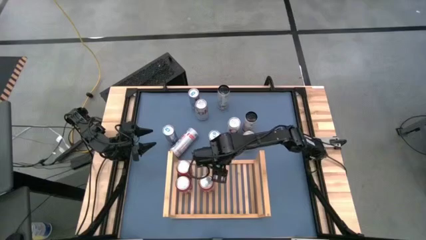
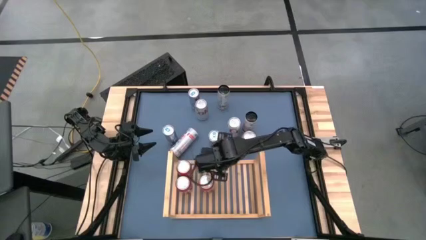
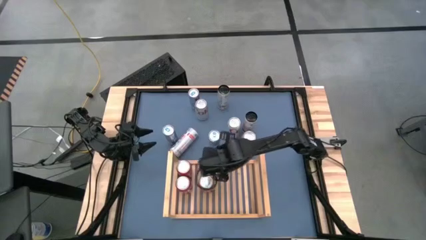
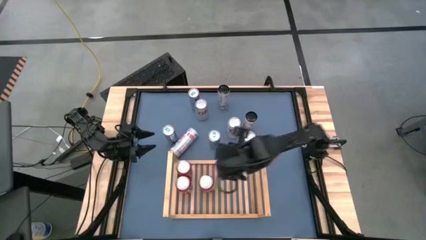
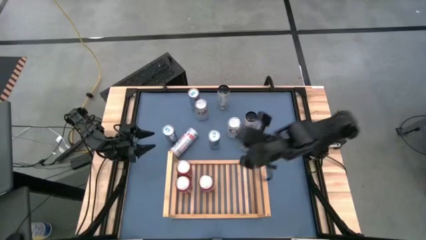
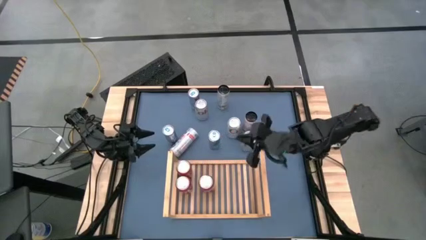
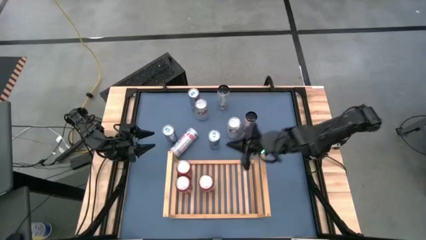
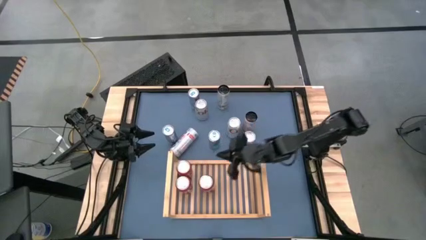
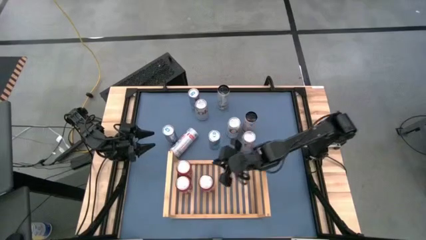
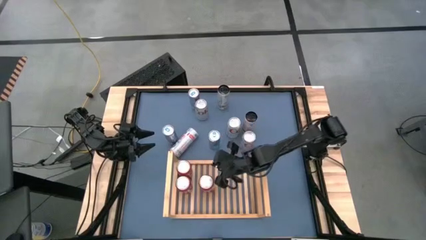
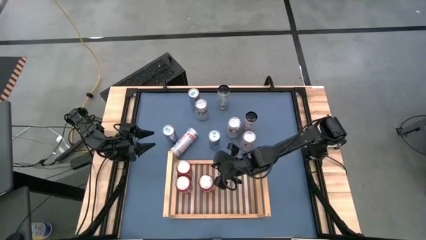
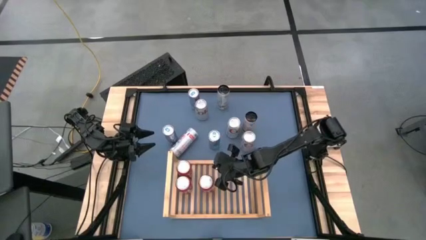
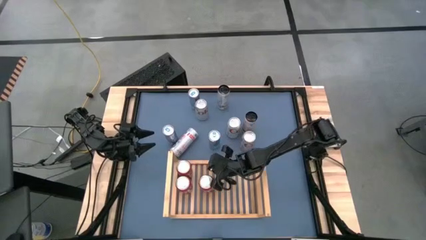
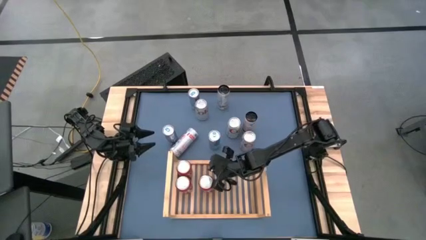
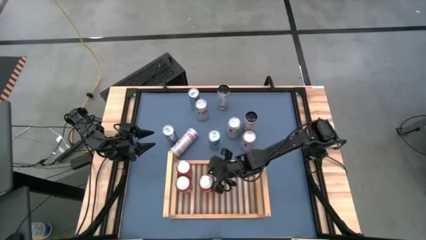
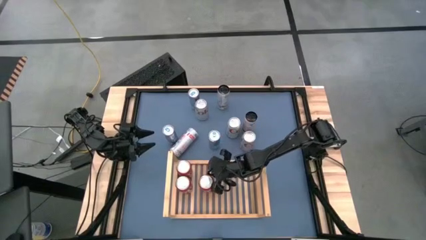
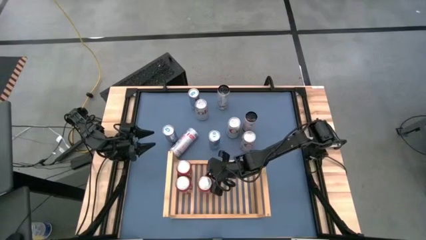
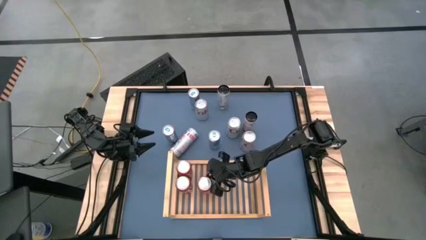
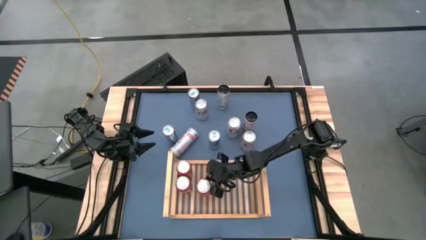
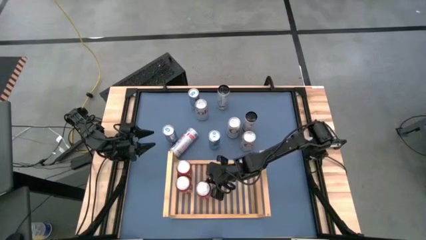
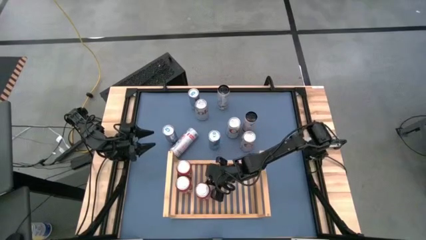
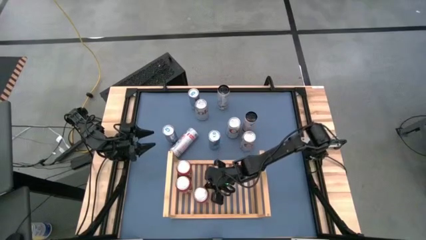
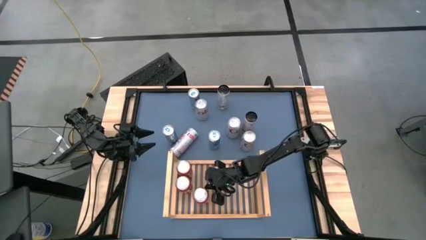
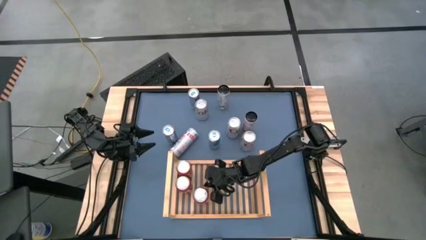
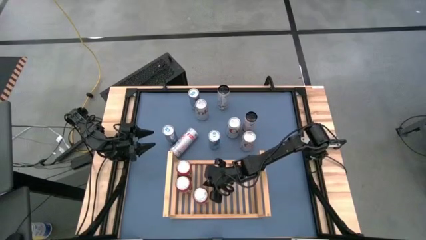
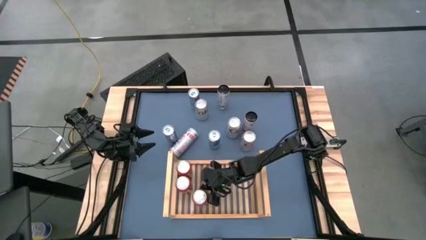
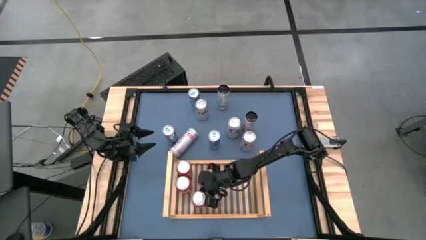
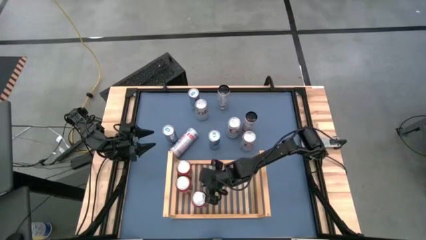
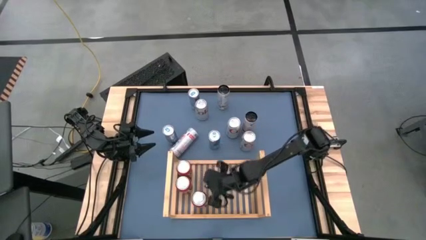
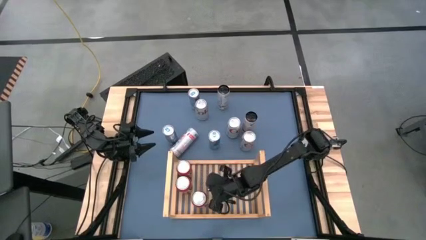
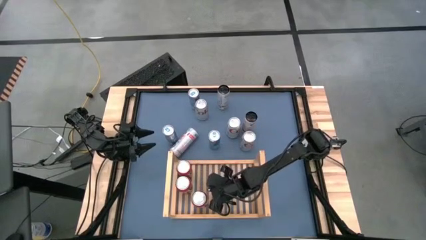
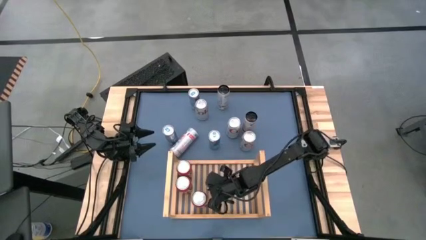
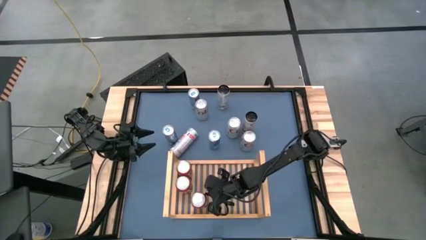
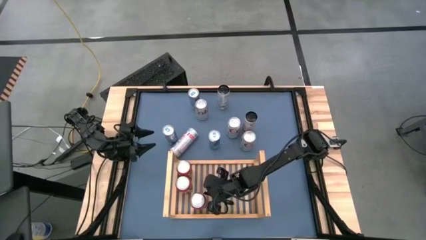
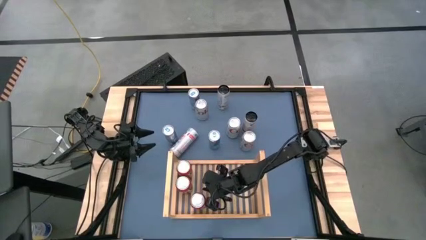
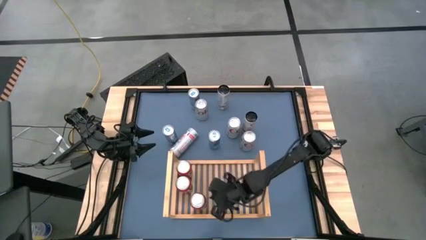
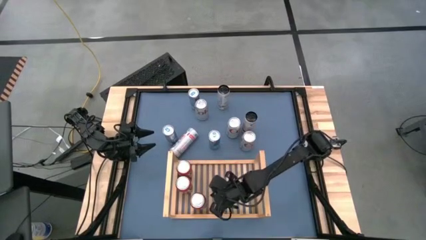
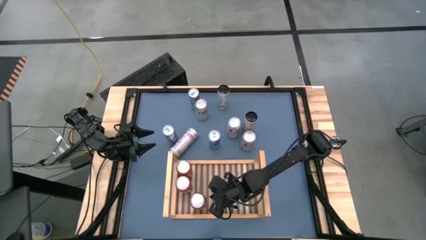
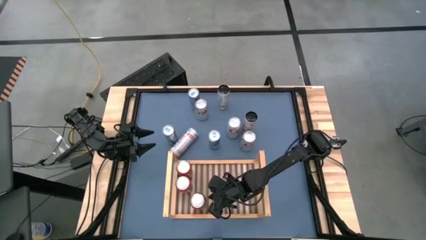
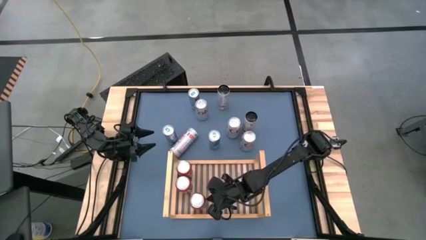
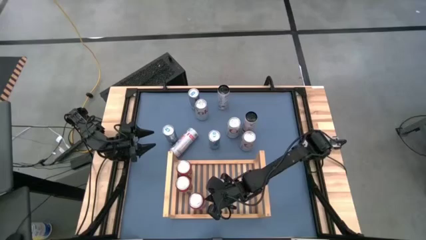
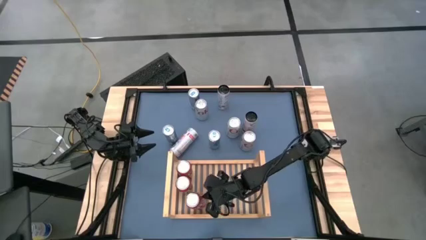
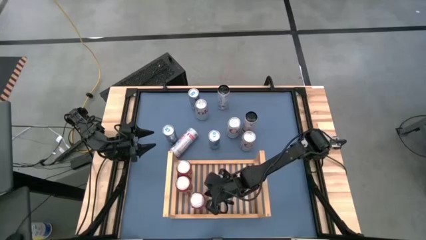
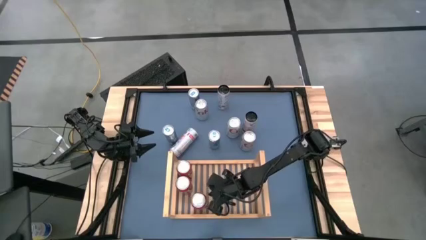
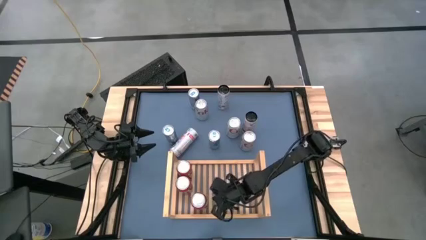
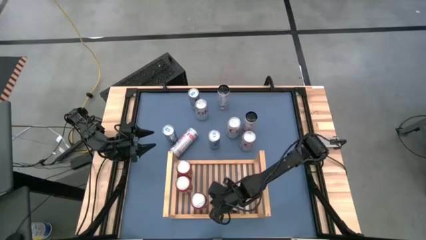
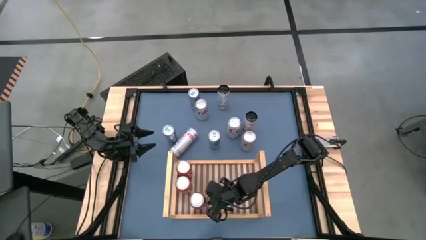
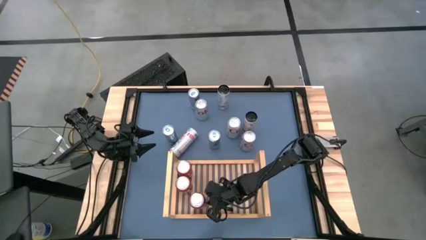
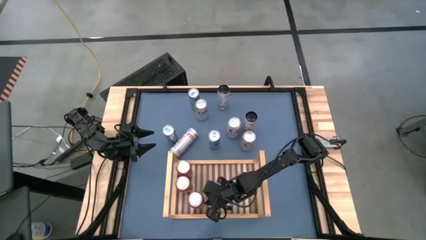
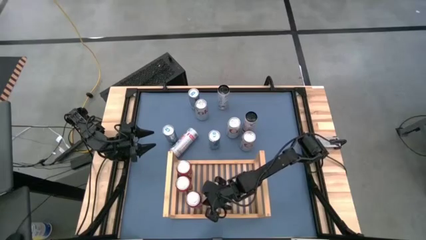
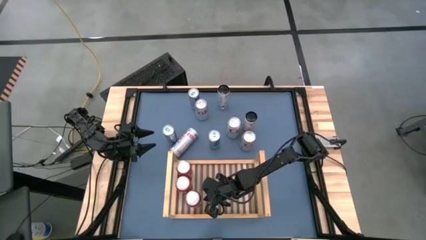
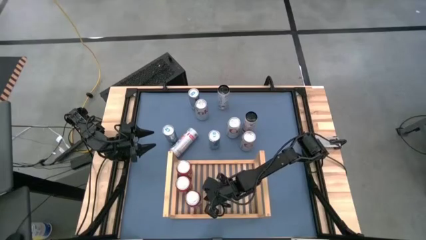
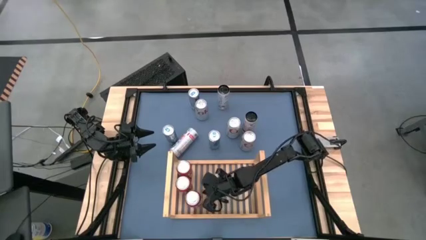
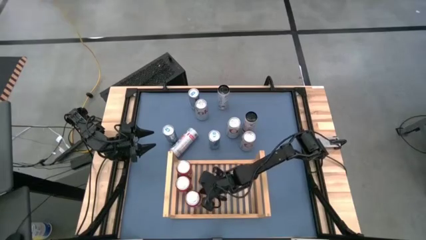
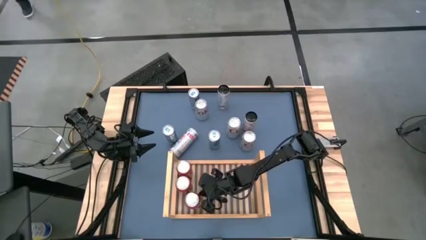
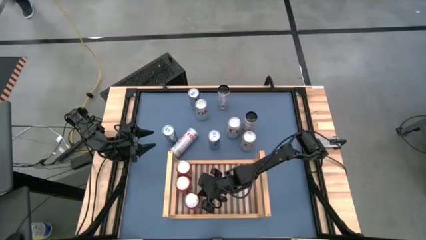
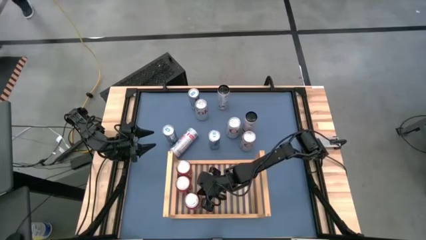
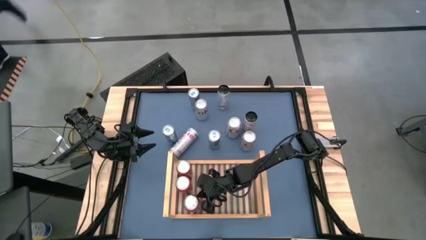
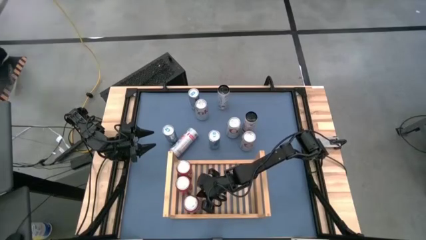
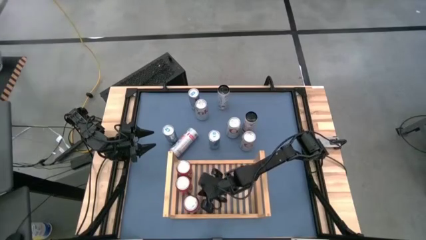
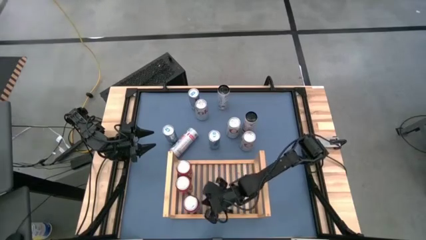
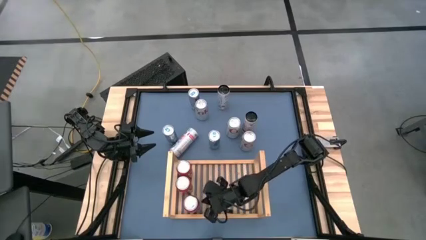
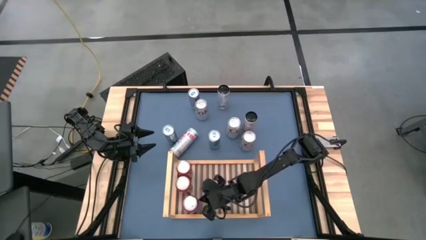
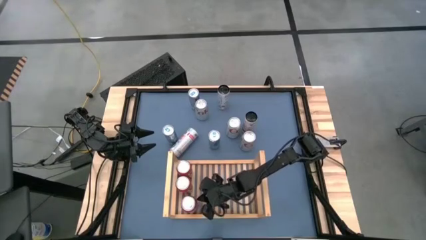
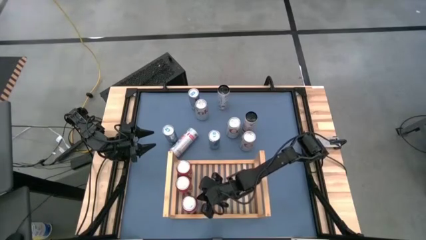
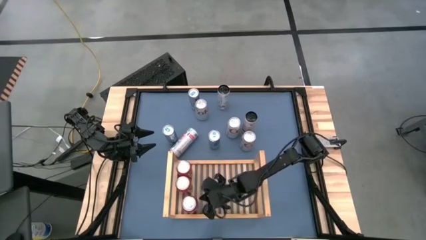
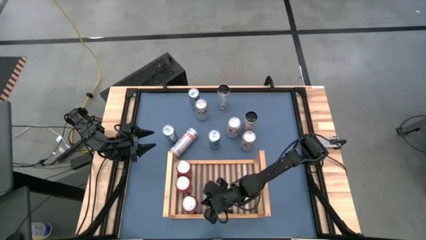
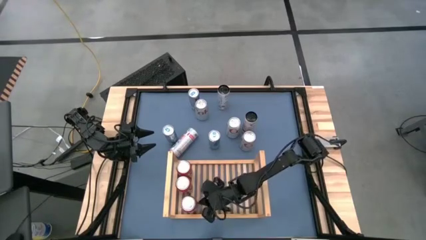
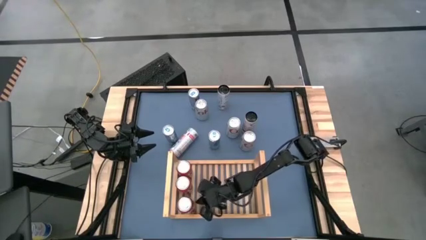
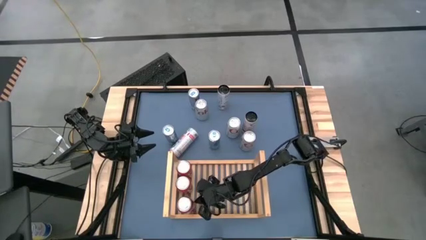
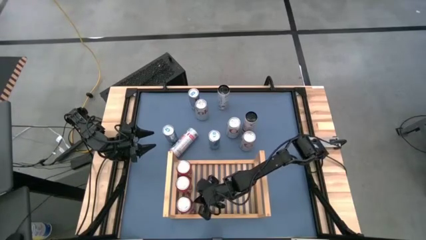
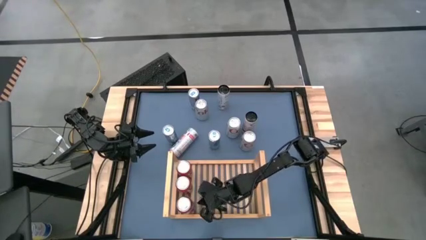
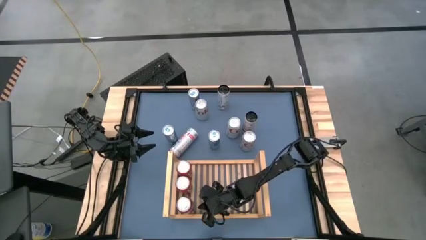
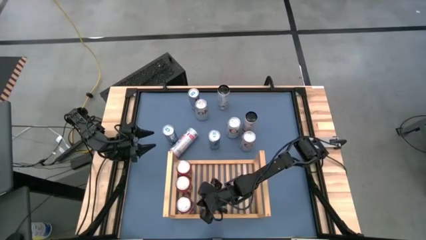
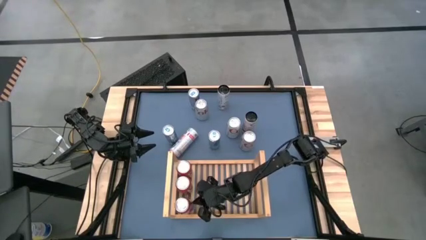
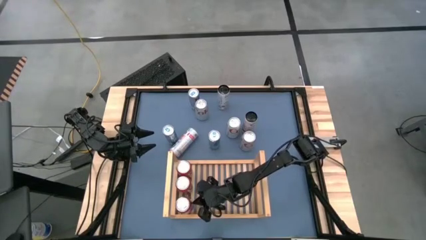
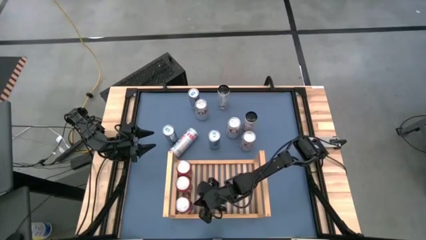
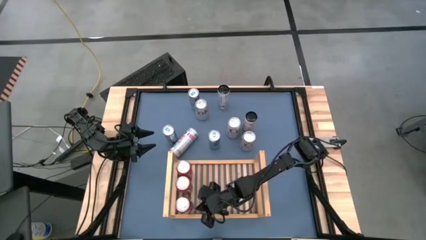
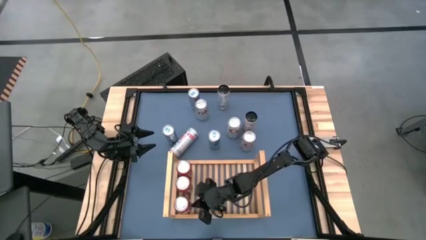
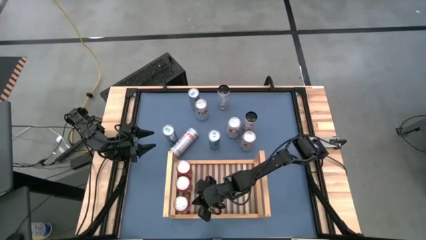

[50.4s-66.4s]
Task: Place canned beverage on shelf
Put the red soda can on the shelf aligned with the other red soda can
